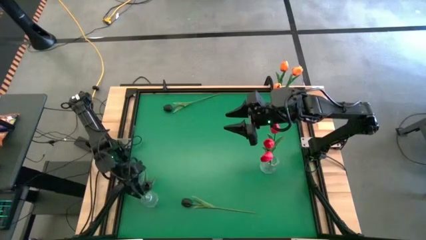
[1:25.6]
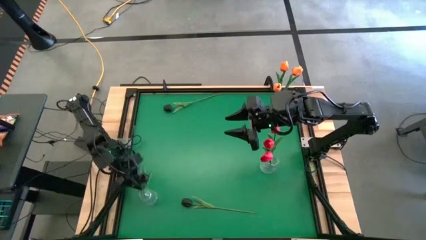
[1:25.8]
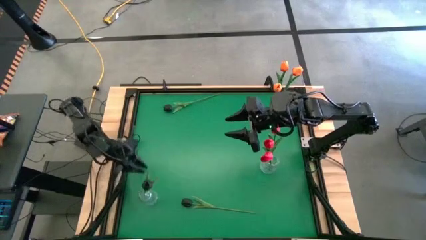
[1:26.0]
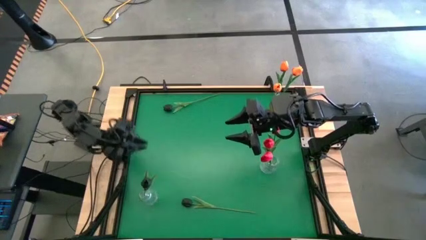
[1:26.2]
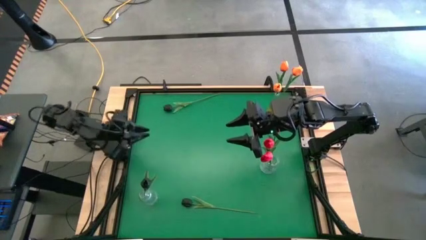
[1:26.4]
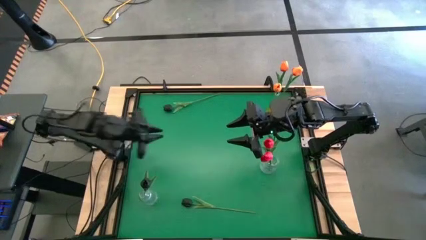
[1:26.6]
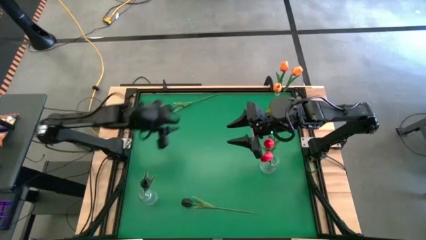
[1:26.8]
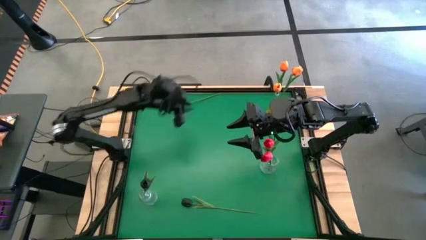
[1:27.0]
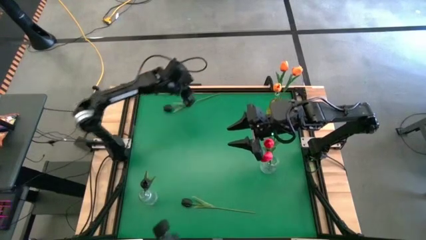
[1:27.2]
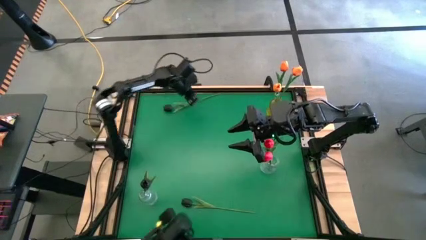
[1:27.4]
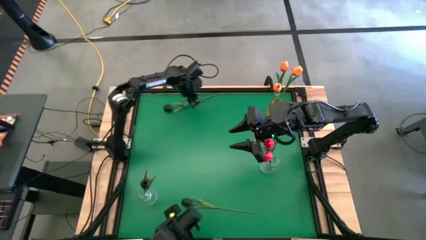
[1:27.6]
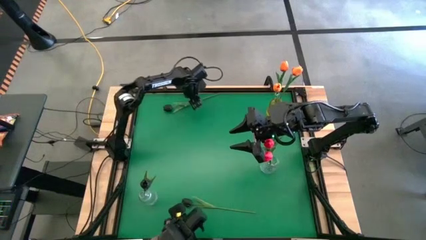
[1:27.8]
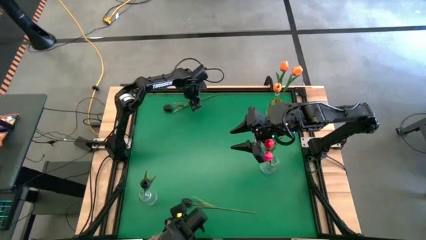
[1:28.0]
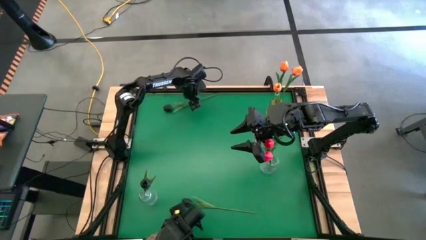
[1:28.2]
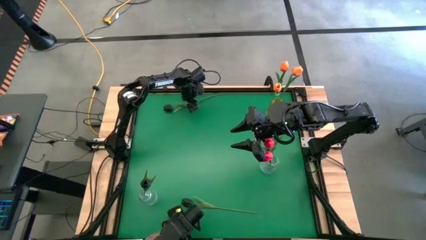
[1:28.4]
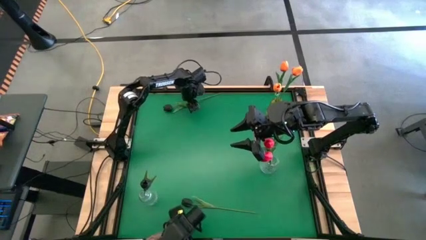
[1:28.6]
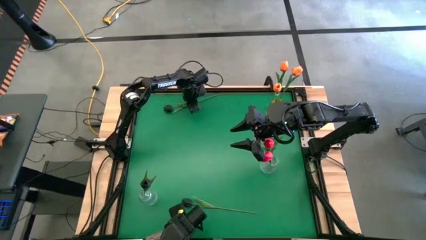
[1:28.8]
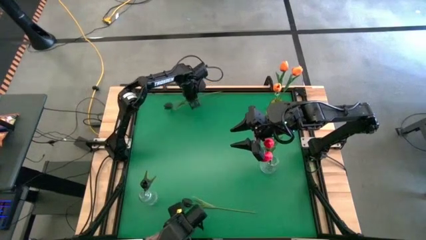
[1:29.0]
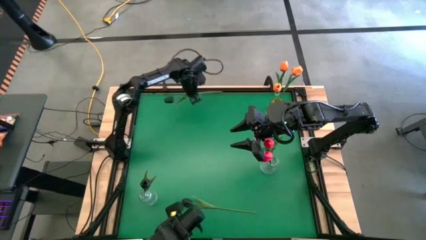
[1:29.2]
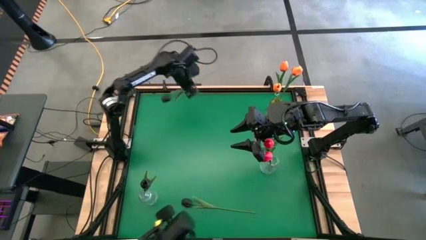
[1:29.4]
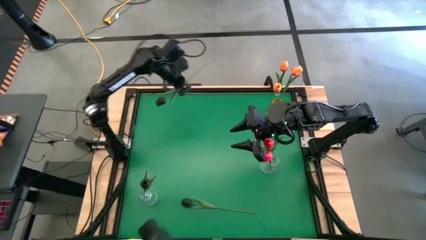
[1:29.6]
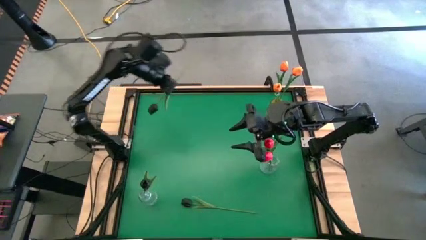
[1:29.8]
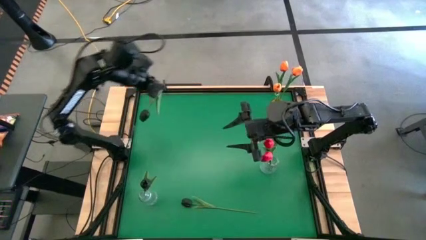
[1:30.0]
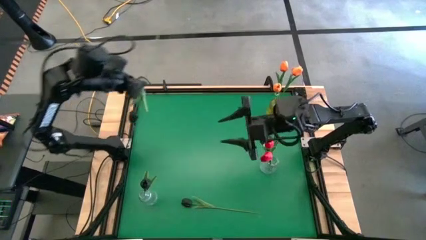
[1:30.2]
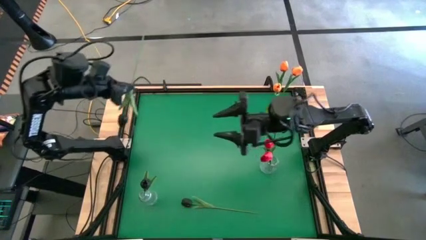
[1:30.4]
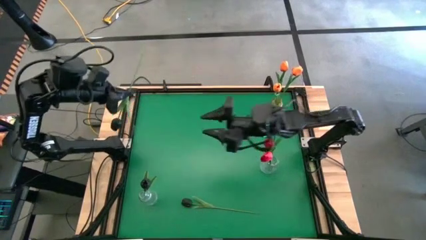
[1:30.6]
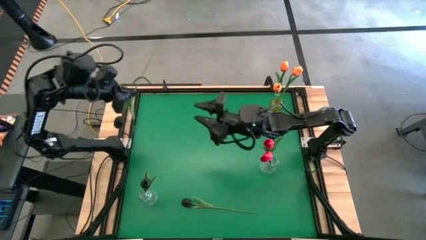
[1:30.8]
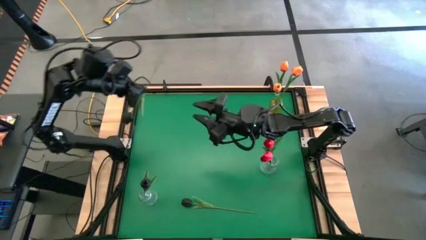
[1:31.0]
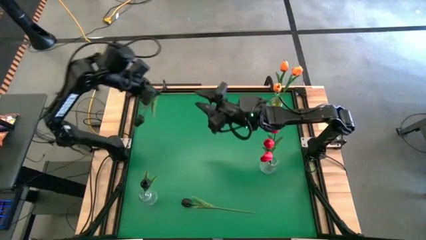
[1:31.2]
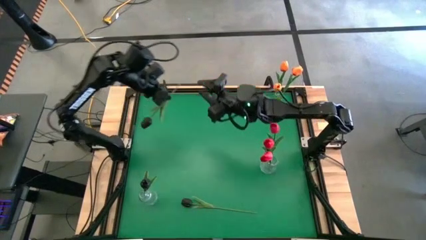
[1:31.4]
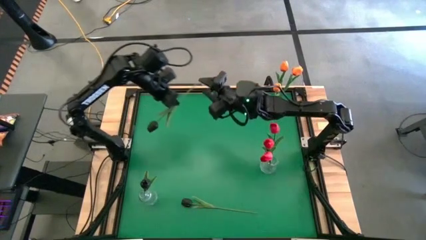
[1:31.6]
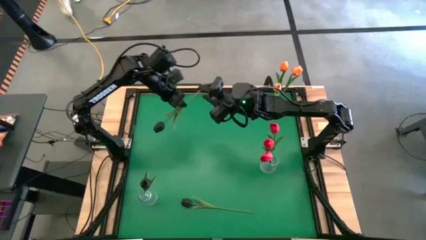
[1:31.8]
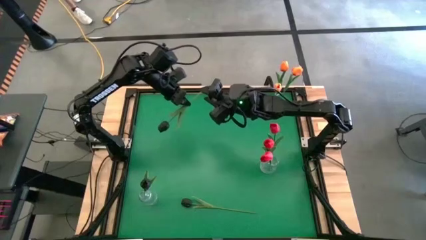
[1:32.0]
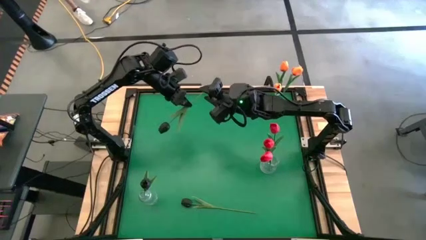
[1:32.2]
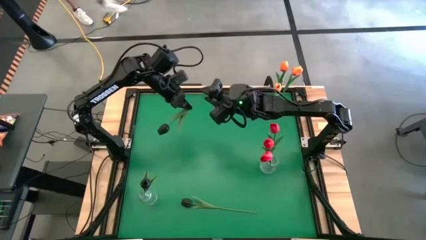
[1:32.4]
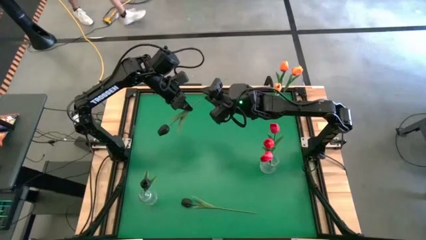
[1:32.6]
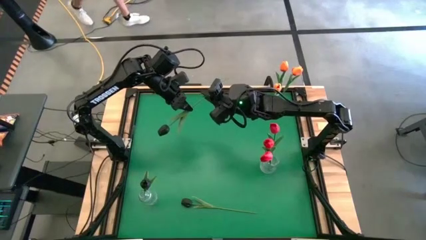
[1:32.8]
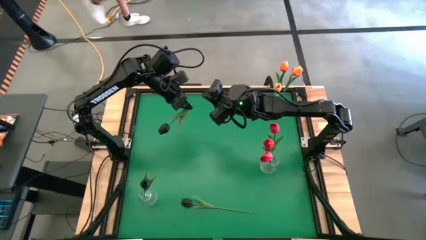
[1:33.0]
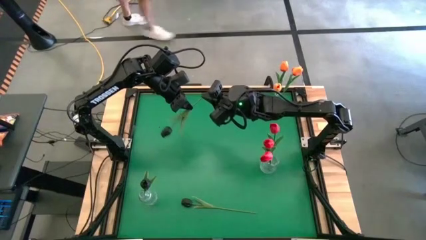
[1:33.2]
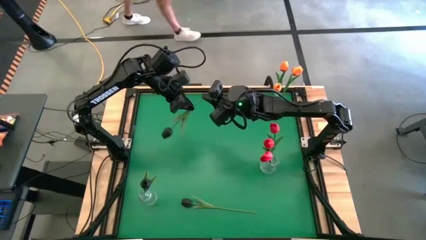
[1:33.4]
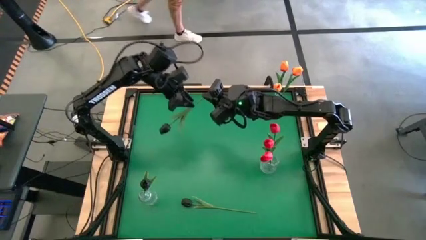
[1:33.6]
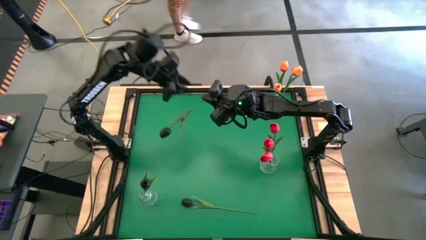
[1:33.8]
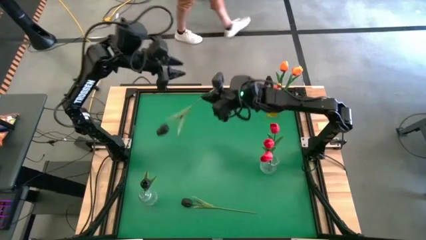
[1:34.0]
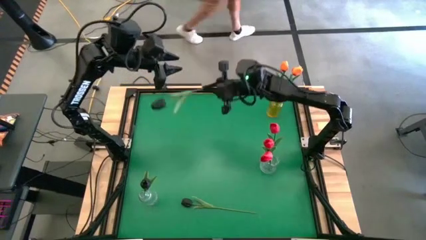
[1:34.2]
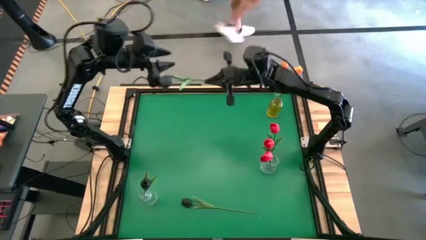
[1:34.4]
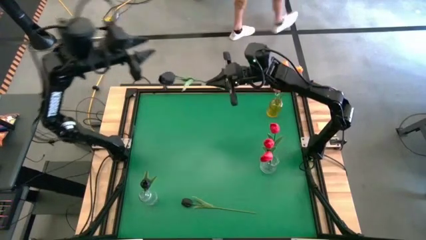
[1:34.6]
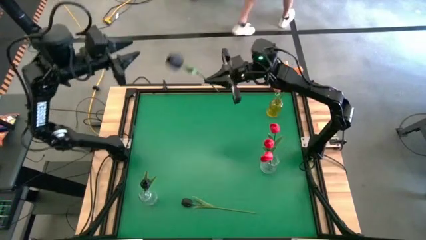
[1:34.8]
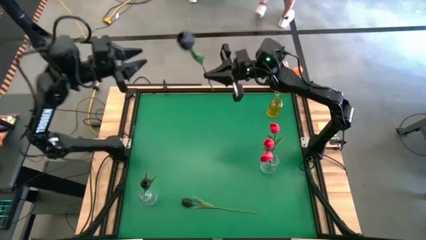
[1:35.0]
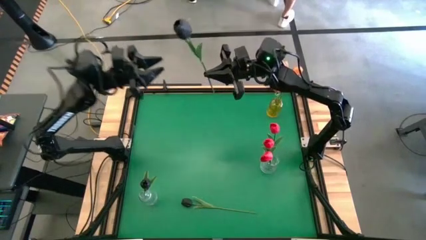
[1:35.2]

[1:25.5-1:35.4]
Task: Sort flowers into vase by color
Put the top black tulip into the bottom transparent flower vase

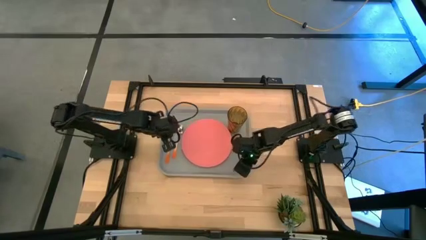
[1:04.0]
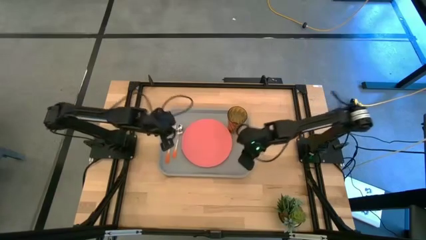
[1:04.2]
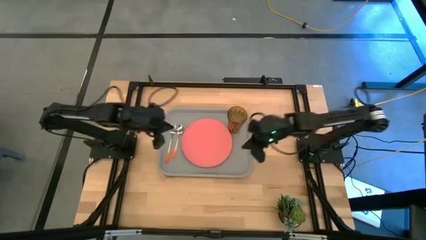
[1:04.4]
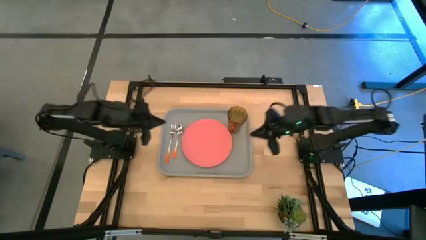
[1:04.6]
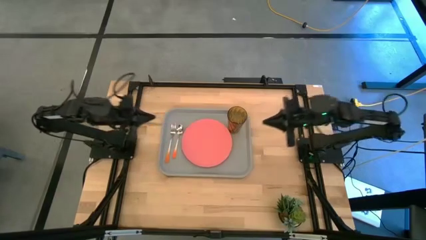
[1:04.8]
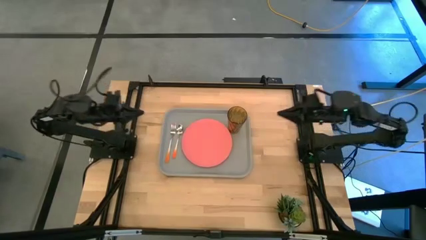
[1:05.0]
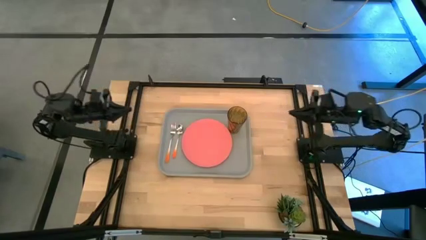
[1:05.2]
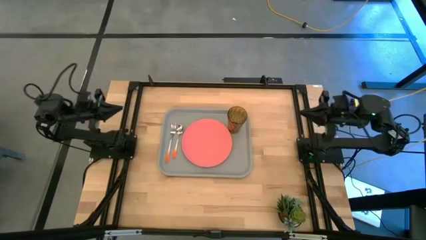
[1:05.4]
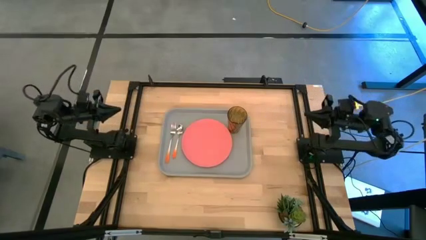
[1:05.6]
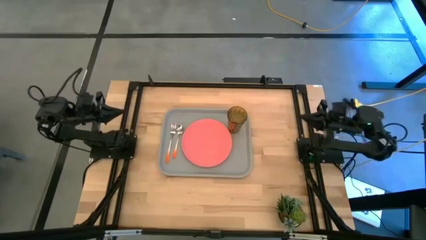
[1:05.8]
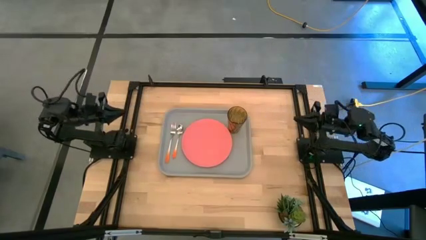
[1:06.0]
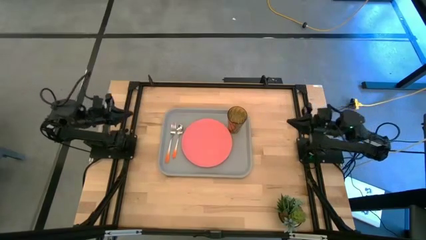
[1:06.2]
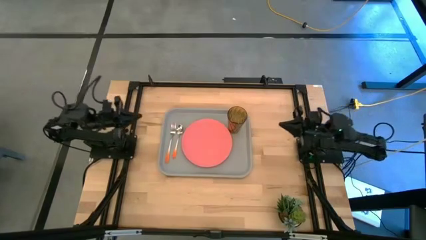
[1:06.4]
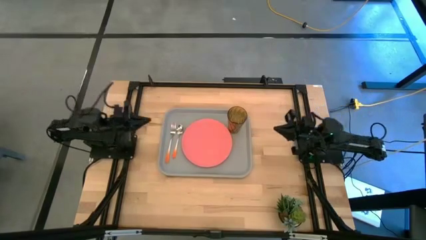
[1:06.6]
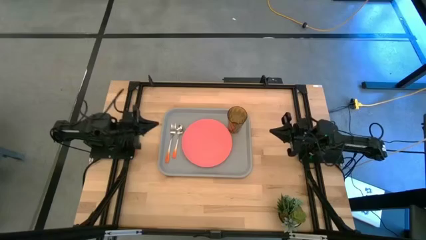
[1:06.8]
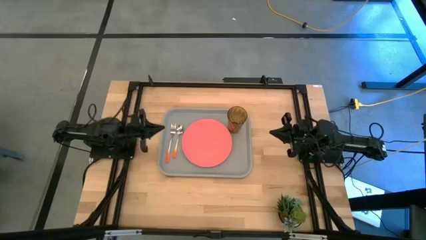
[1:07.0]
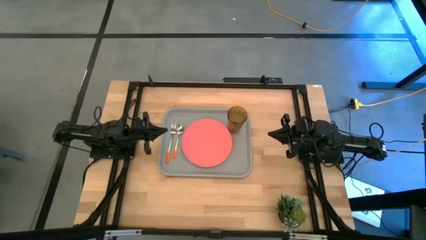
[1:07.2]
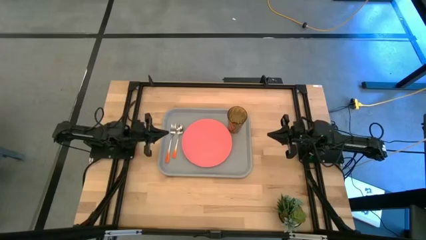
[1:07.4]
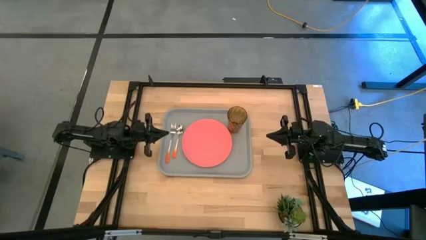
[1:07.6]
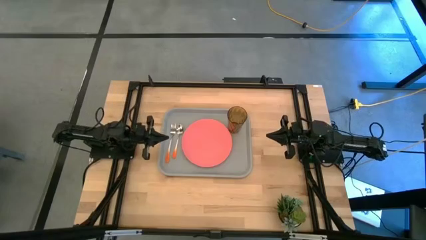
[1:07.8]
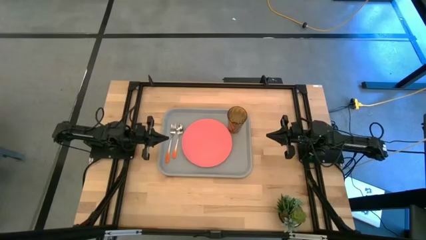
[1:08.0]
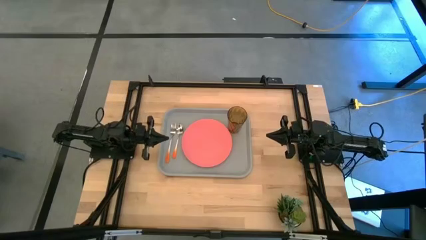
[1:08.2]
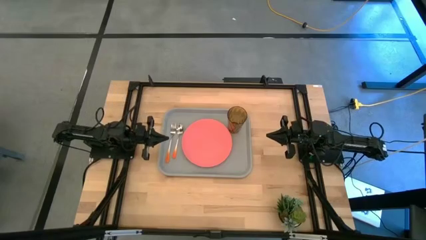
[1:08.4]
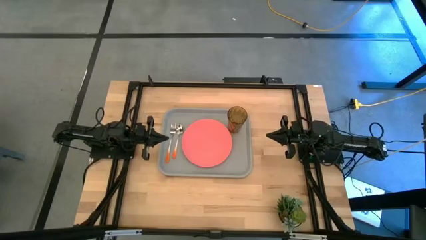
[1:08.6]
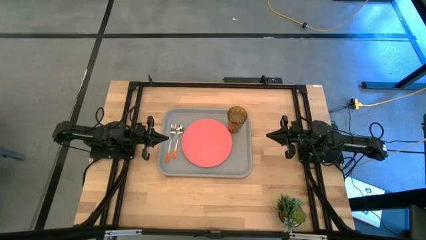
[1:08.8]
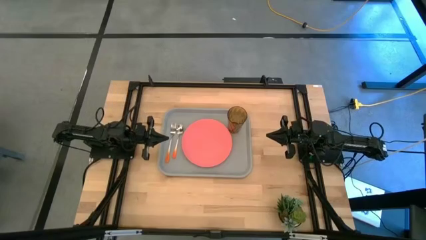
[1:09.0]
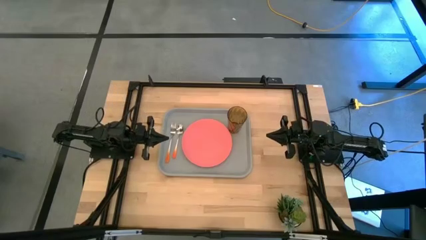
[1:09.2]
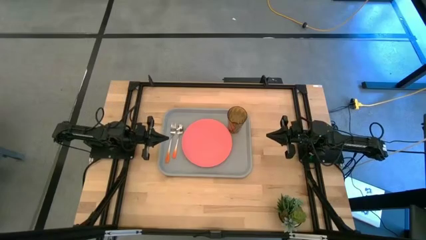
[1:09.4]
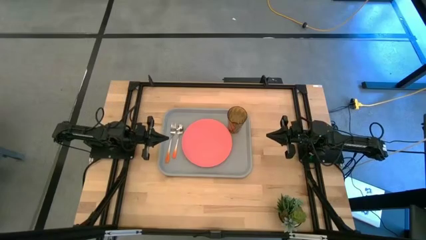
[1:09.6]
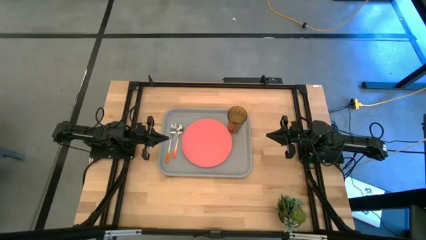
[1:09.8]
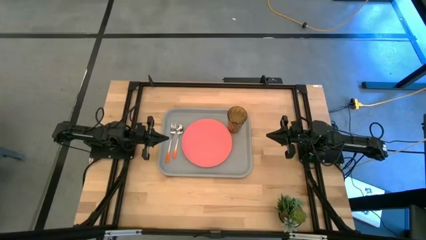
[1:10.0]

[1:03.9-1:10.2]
Task: Pick and place plate/cup/fork/spoon on tray
Return to Home Position
